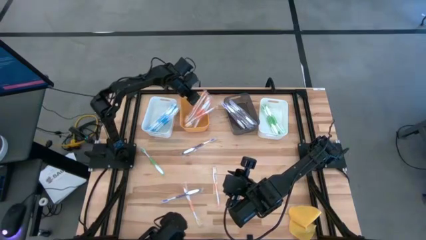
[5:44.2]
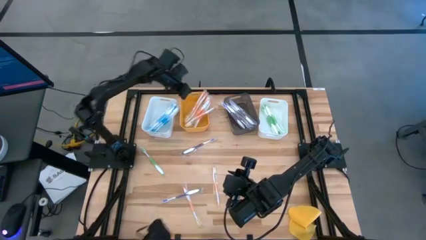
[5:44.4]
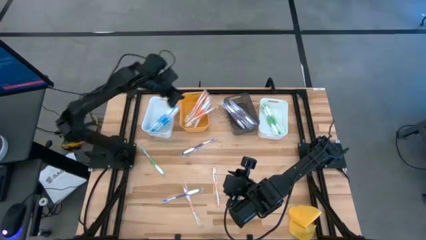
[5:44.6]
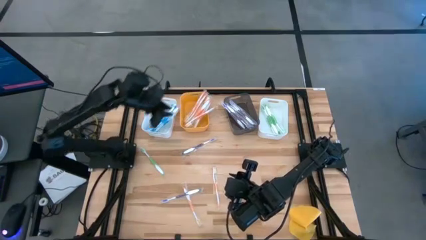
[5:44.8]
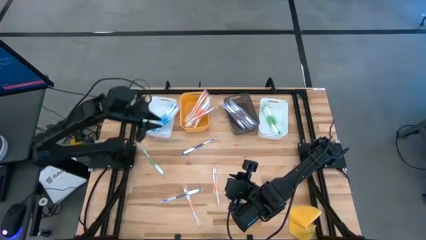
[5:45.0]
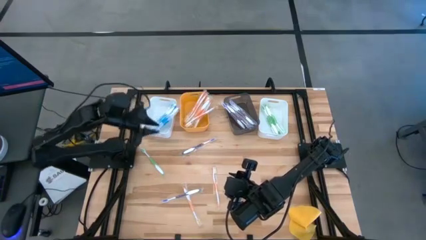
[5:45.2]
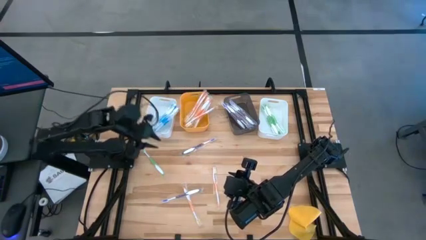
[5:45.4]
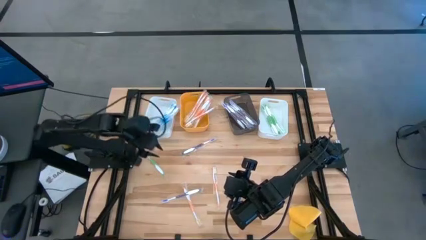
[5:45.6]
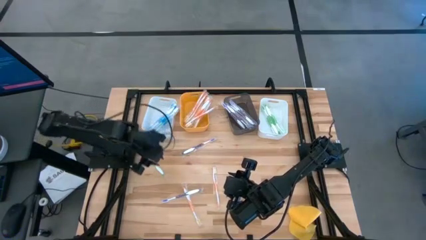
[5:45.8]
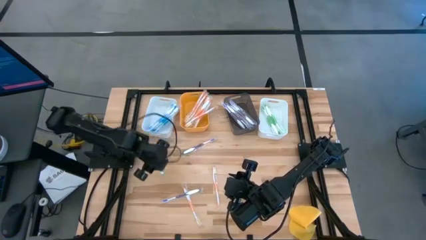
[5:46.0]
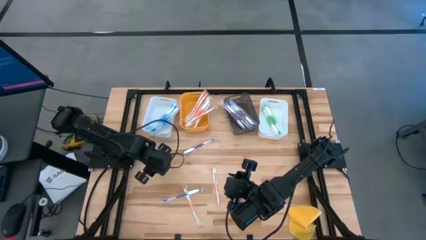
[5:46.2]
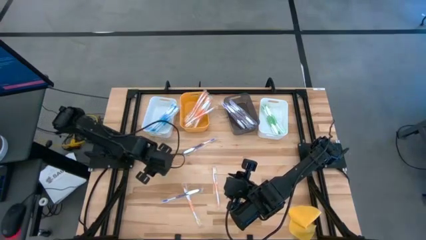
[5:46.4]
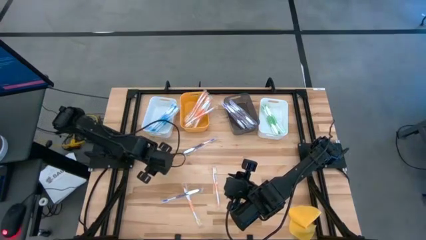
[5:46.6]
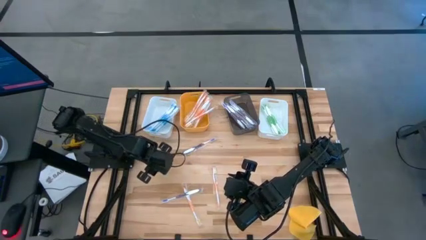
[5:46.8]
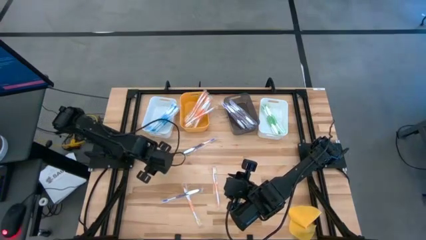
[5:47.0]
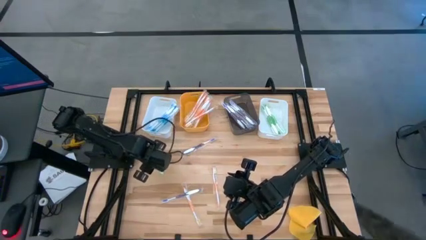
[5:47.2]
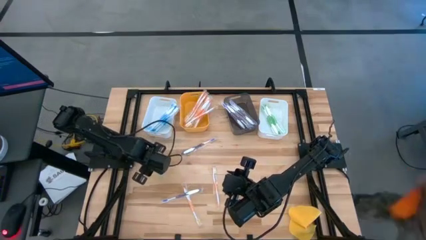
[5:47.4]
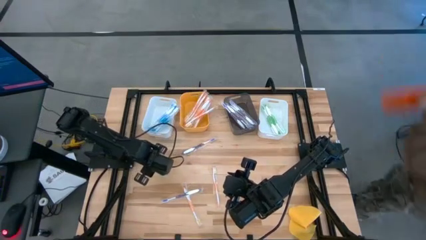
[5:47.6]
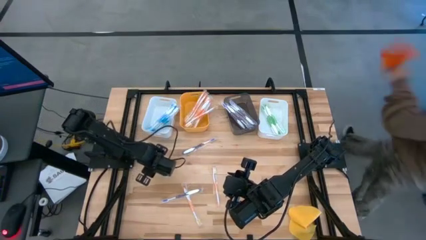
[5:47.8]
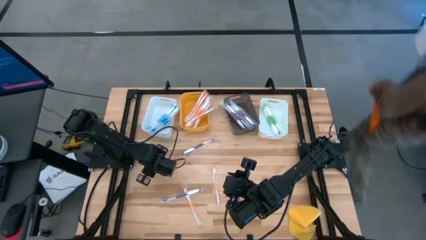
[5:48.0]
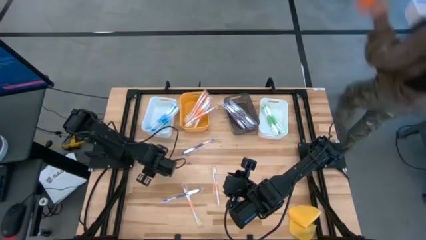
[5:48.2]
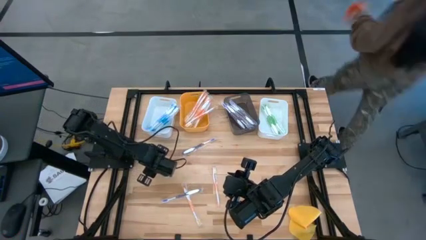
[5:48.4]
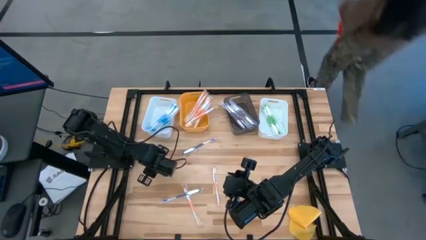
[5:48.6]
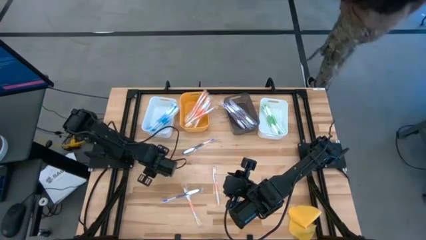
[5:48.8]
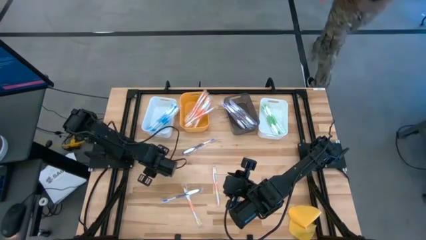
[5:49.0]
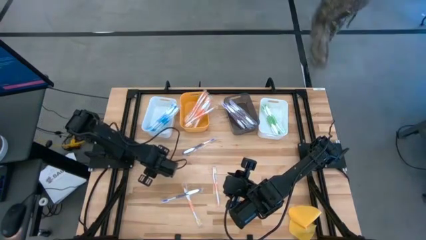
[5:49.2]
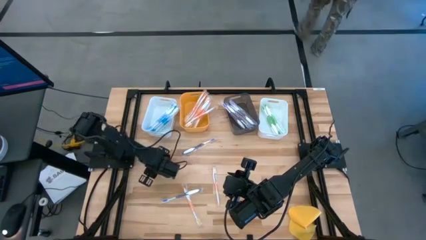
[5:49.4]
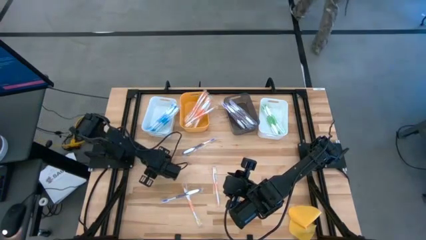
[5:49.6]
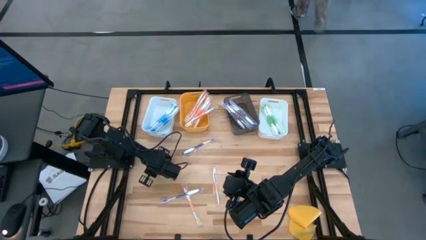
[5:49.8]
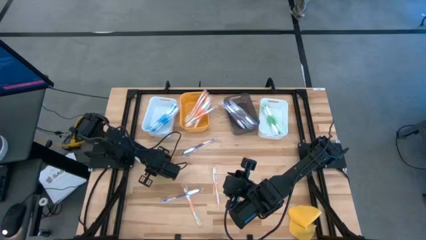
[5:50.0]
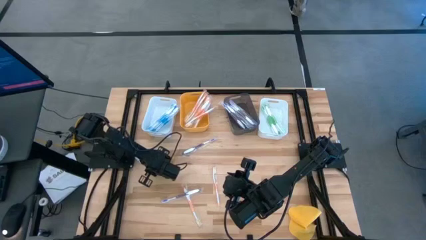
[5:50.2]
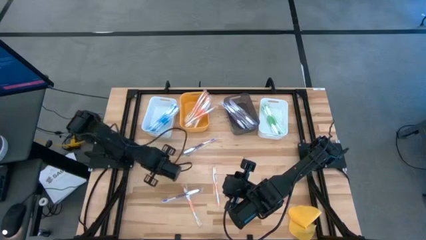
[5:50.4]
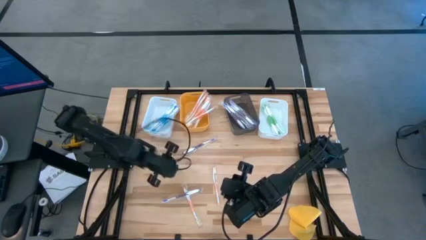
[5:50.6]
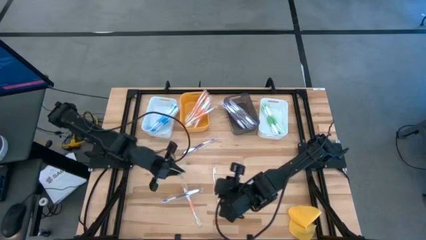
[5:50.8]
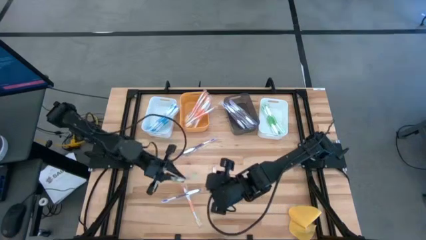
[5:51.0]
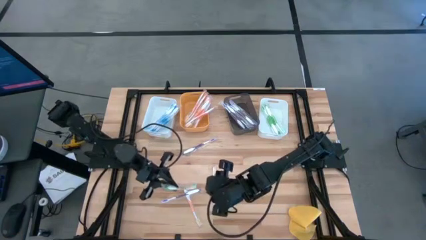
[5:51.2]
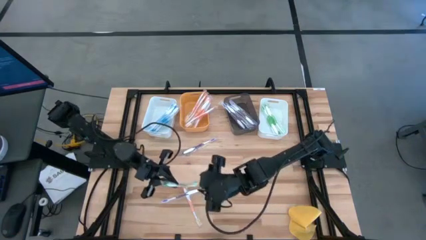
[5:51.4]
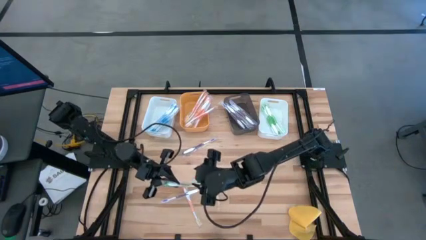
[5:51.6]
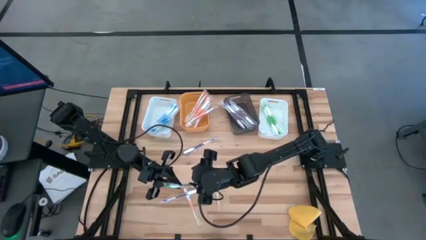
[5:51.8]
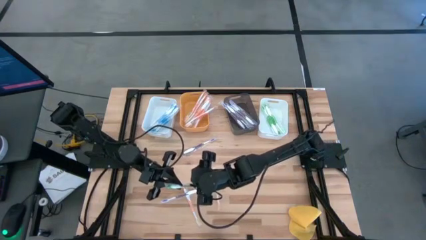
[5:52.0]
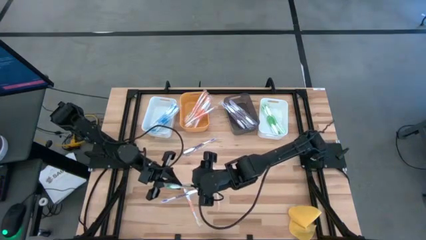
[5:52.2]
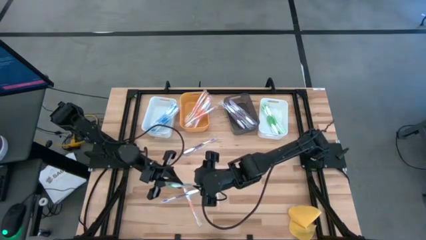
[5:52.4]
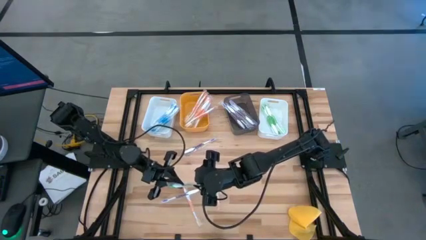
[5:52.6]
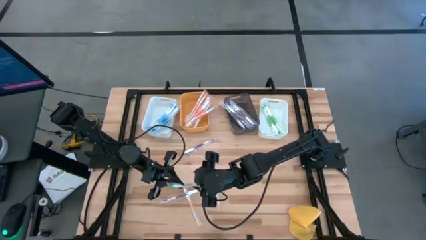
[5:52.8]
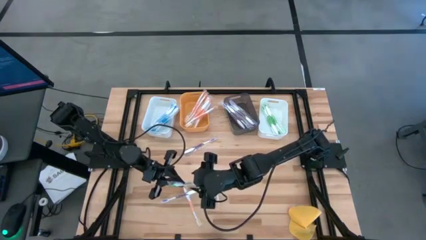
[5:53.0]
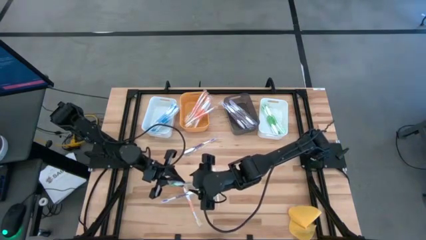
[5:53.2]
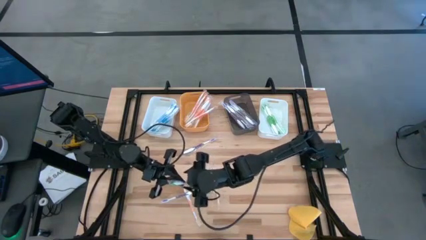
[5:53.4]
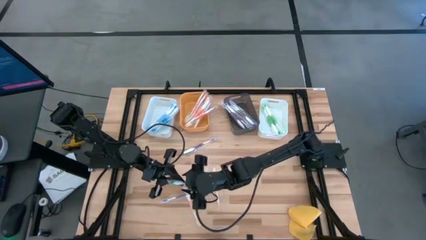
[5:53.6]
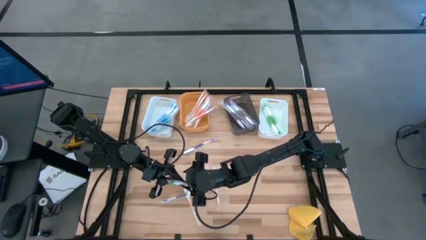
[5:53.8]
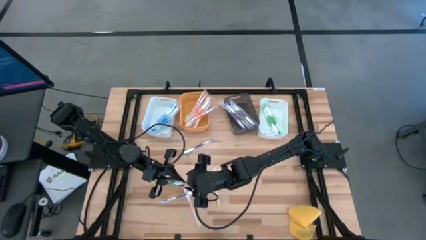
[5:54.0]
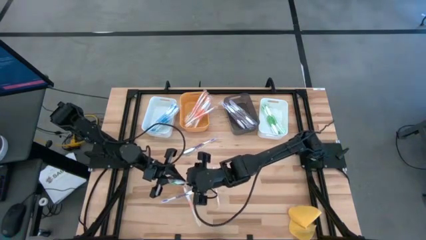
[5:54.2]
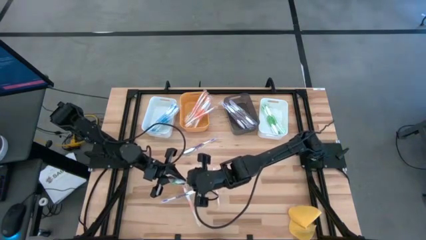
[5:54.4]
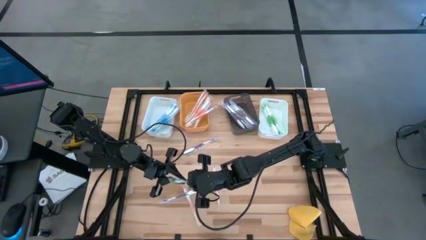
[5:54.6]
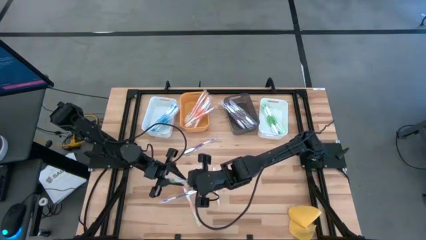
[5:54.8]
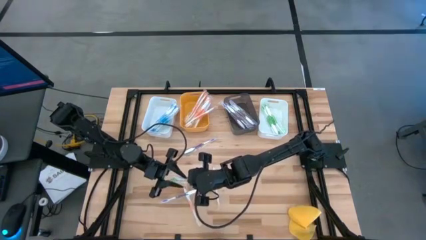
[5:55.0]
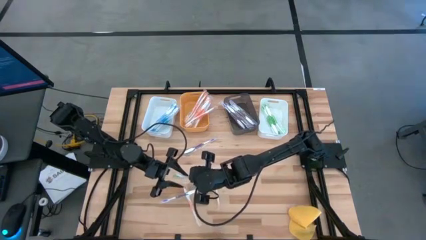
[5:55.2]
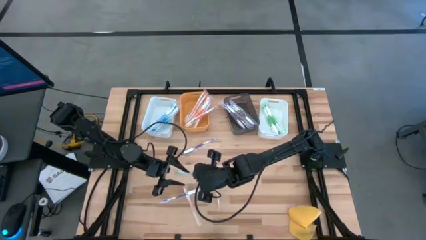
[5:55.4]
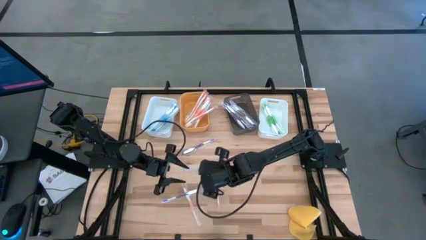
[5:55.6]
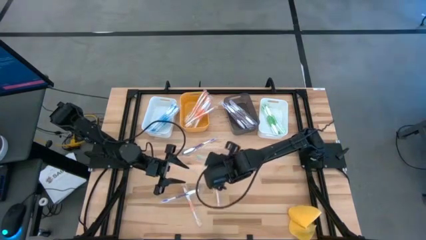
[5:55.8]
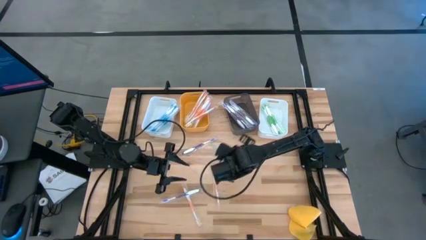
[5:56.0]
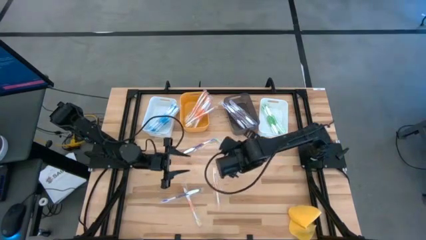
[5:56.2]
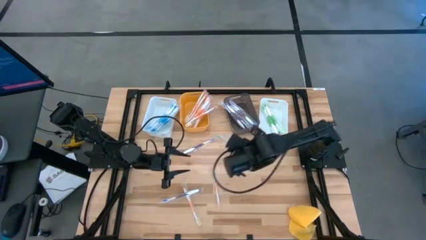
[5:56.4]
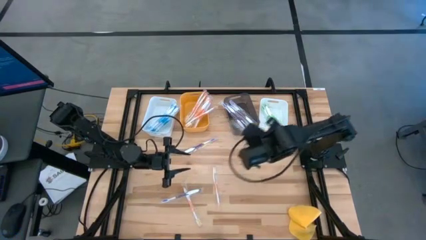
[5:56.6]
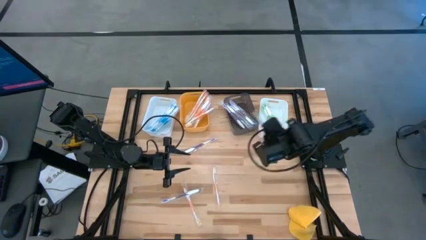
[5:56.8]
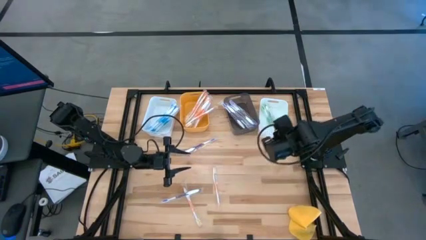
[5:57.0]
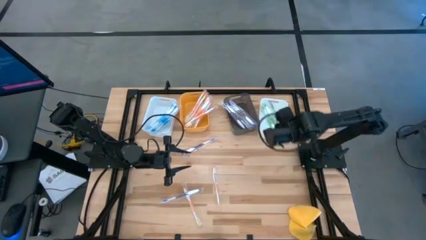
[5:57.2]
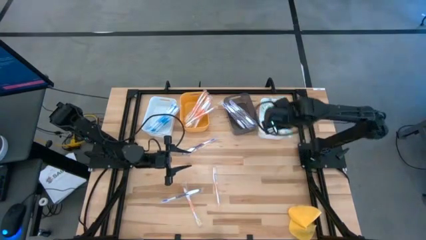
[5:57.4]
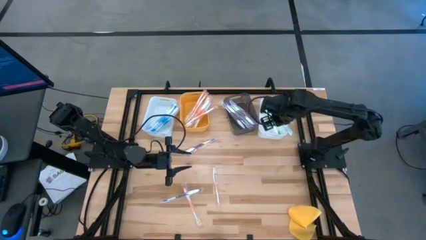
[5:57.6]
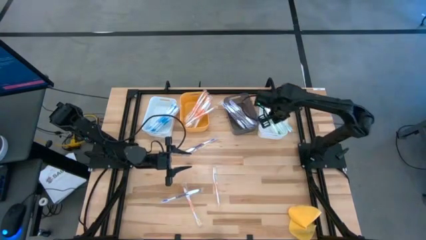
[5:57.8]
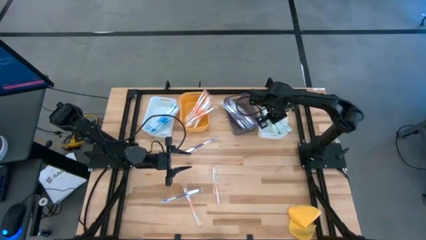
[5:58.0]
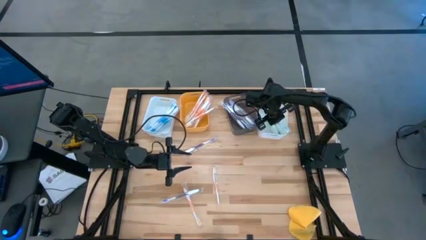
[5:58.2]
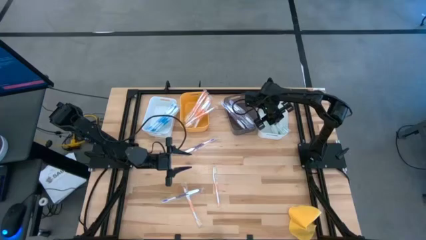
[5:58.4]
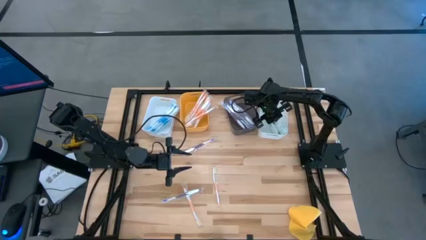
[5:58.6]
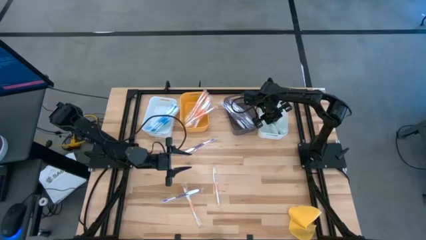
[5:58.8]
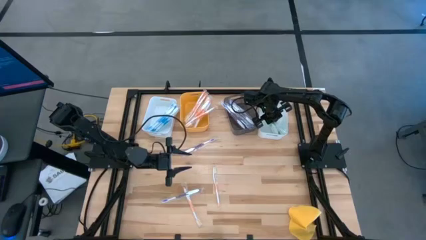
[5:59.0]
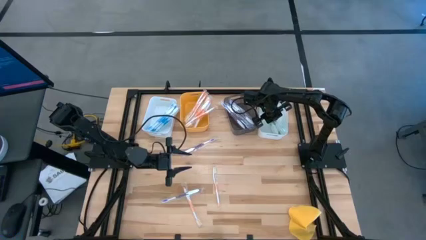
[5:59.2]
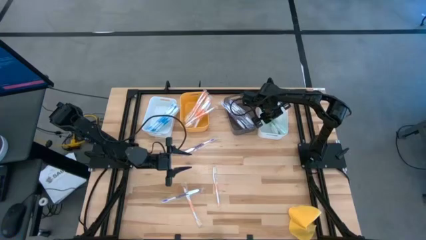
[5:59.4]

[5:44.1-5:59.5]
Task: Pick & Place Toothbrushes
Put the green toothbrush into right white the bin

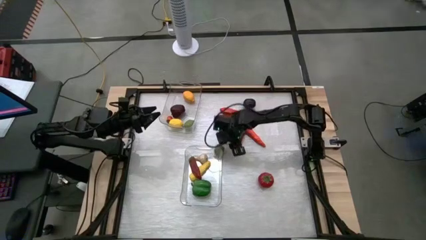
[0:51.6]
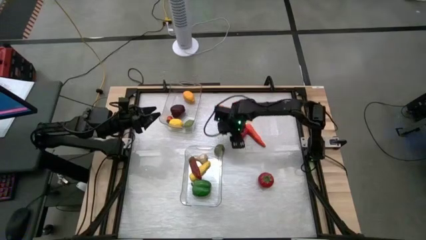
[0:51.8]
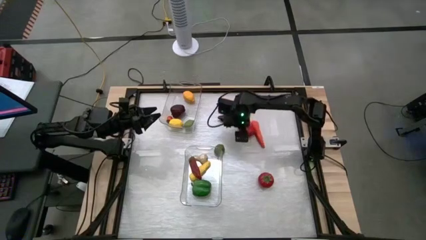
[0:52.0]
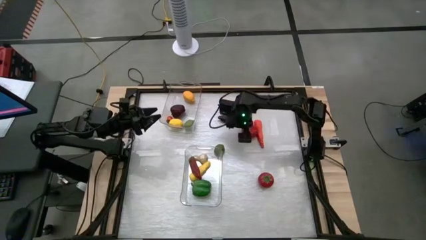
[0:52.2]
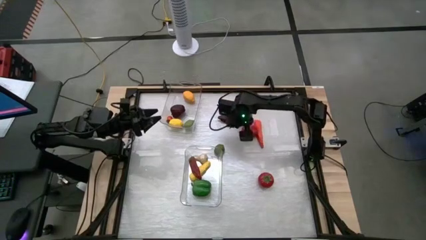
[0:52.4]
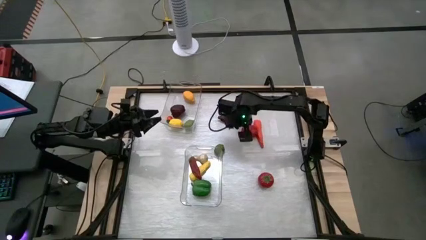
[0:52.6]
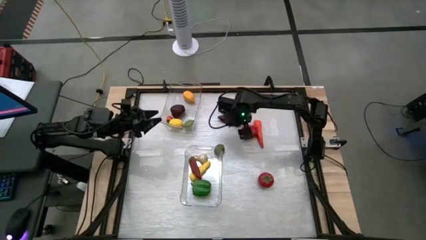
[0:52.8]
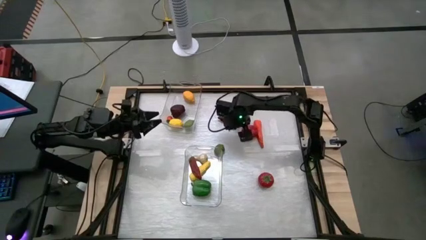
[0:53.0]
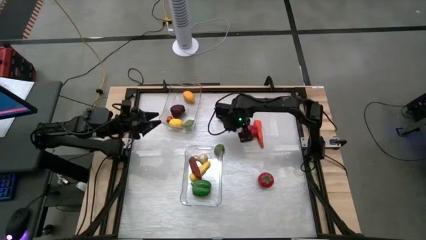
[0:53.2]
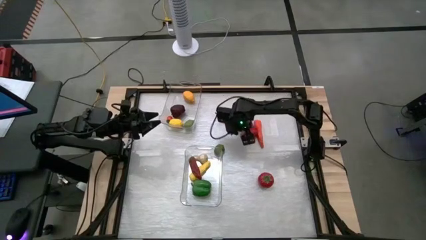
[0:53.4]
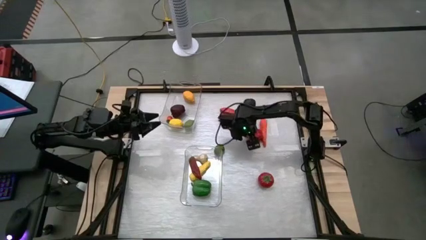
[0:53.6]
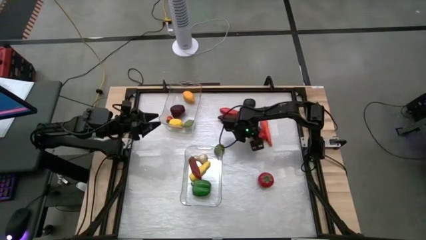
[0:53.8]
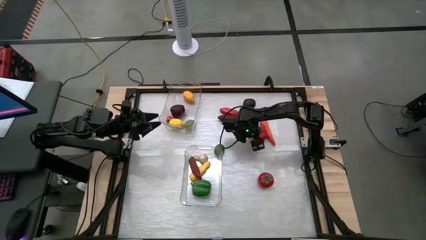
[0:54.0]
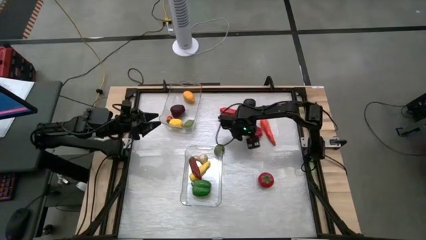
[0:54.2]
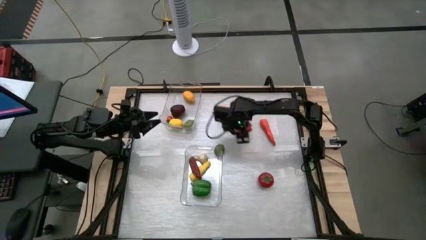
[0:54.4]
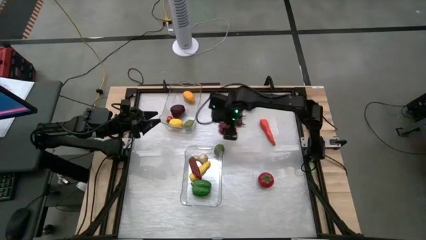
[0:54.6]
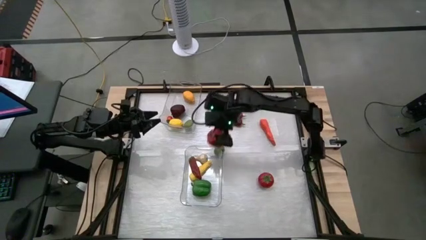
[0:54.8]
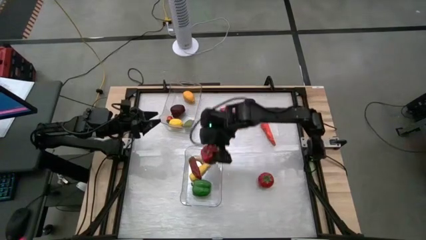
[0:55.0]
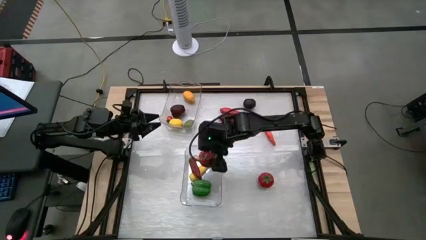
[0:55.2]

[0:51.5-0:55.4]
Task: Sort produce into baskets
Put the red bell pepper into the bottom transparent bin
